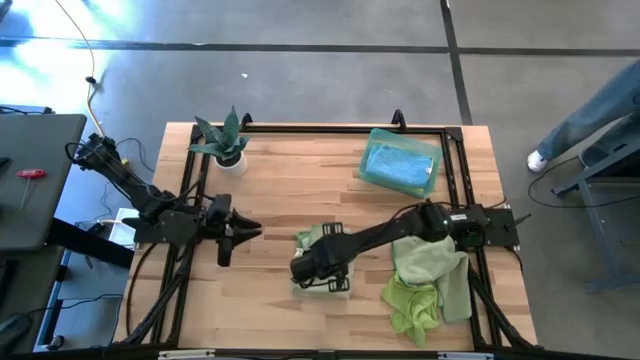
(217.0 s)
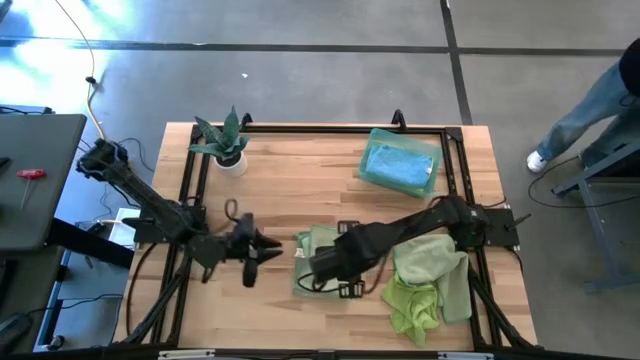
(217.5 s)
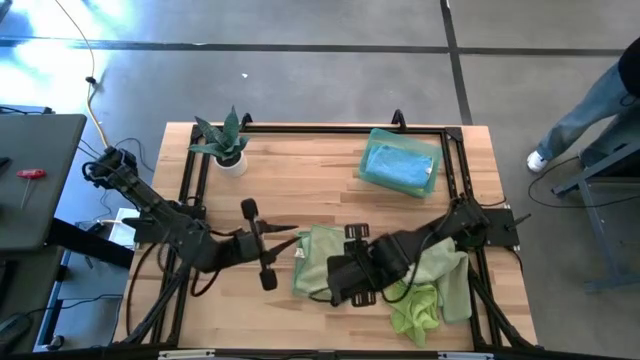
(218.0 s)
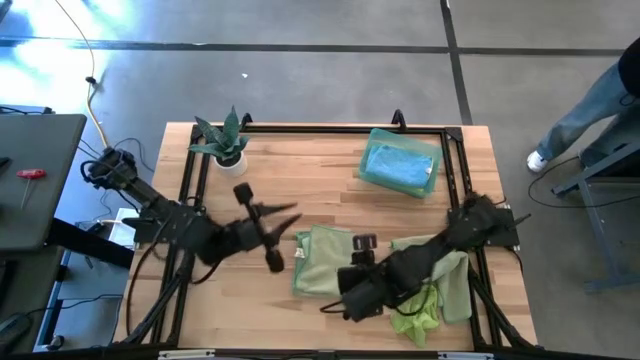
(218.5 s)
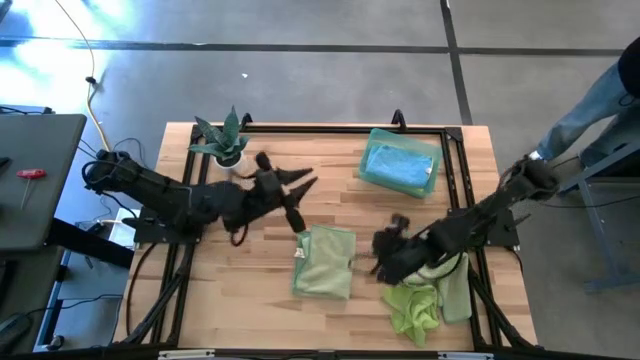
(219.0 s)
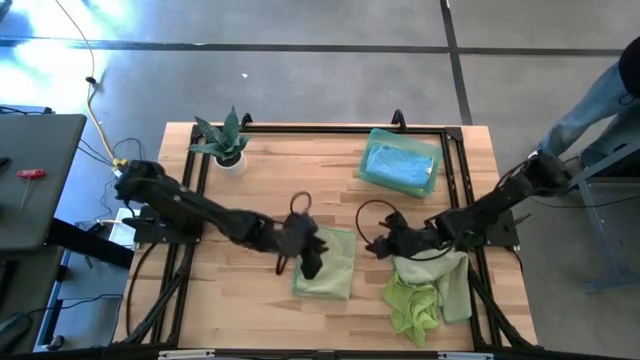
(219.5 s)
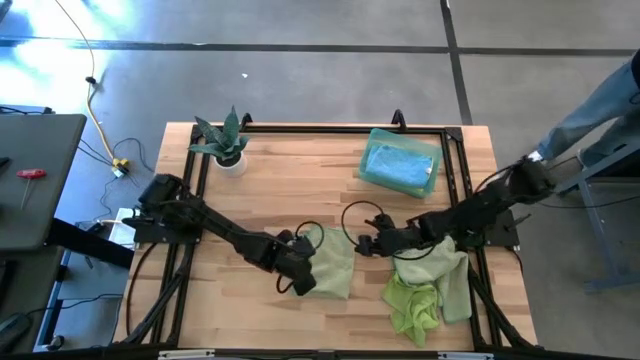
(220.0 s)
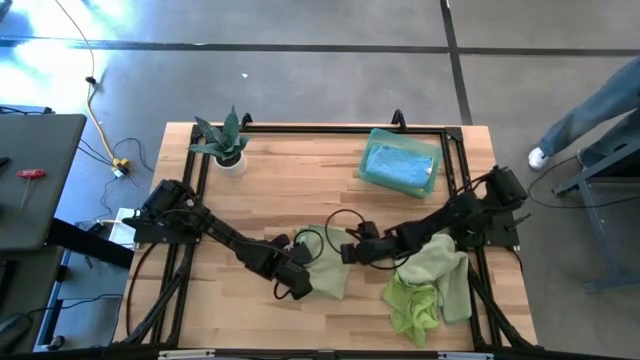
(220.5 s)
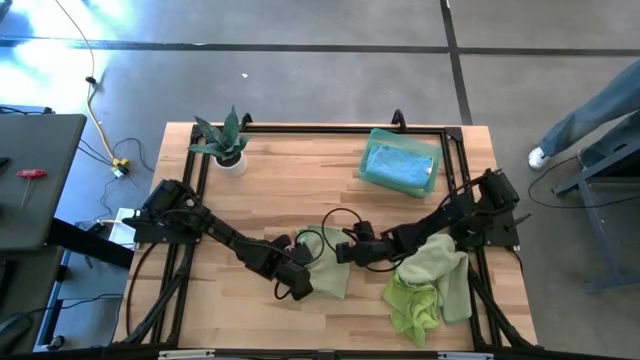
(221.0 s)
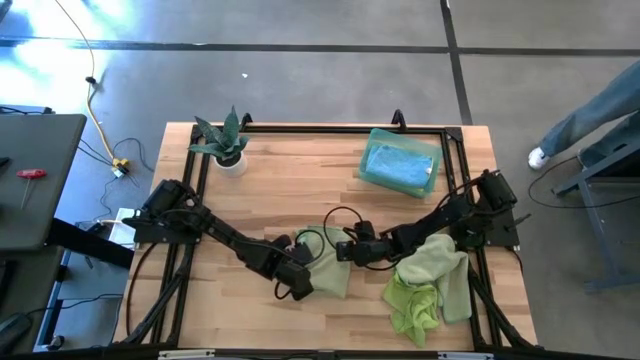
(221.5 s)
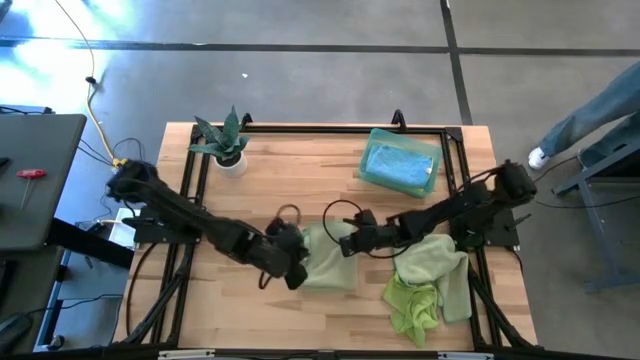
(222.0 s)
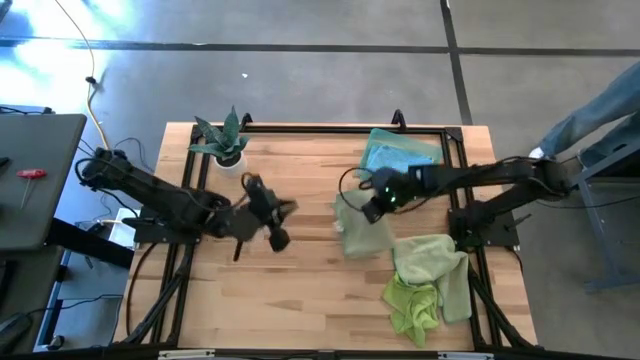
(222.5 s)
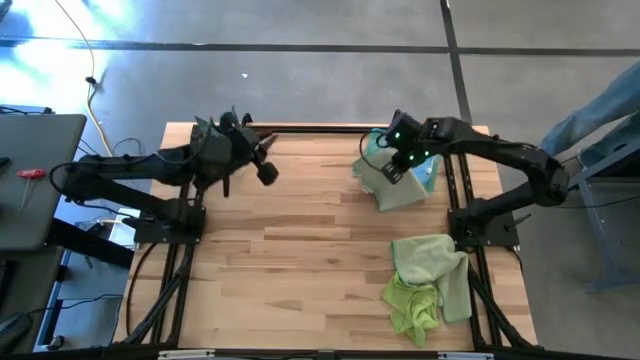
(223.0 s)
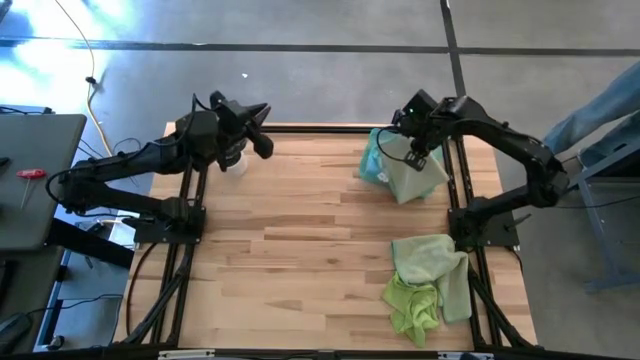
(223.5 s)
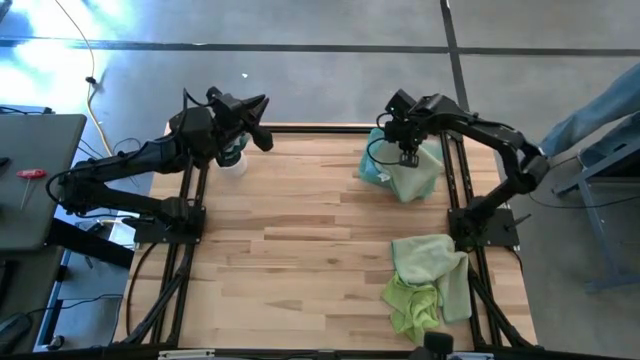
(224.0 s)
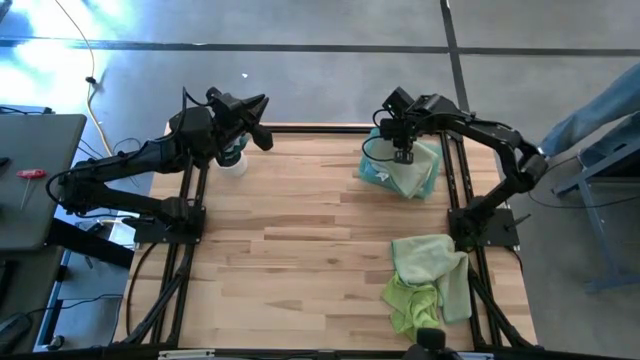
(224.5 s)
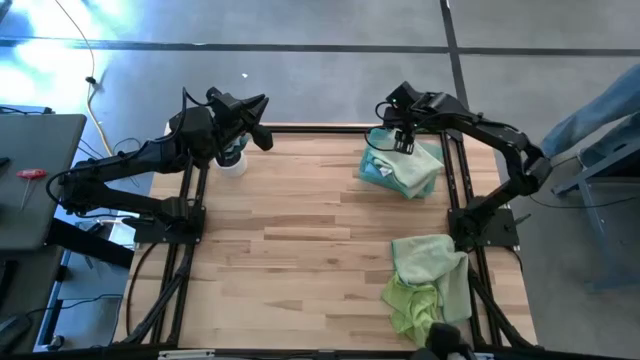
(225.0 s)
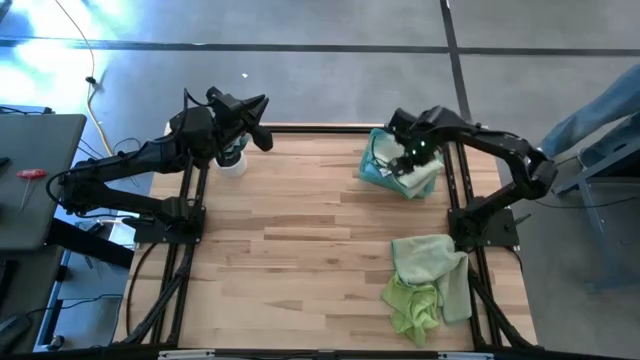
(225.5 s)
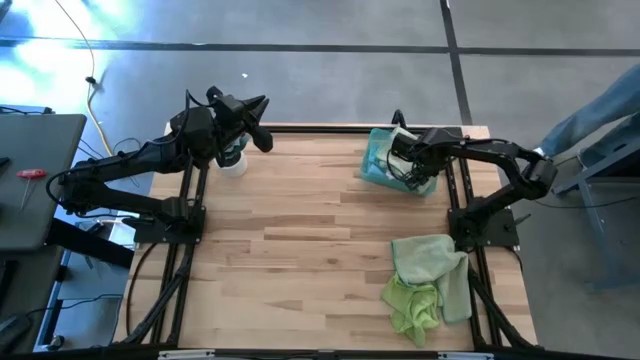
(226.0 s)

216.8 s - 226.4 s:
Task: Fold microfiber towels
Stack the folded left green microfiber cloth on top of the folded blue microfiber cloth

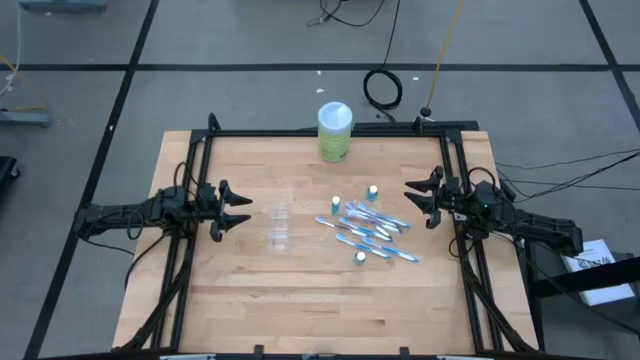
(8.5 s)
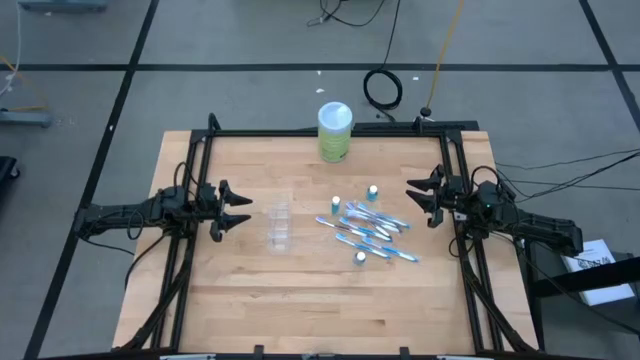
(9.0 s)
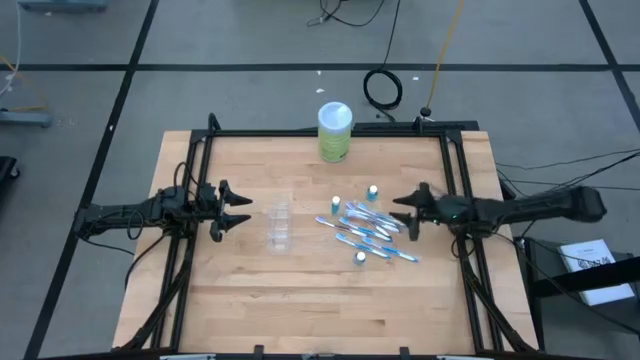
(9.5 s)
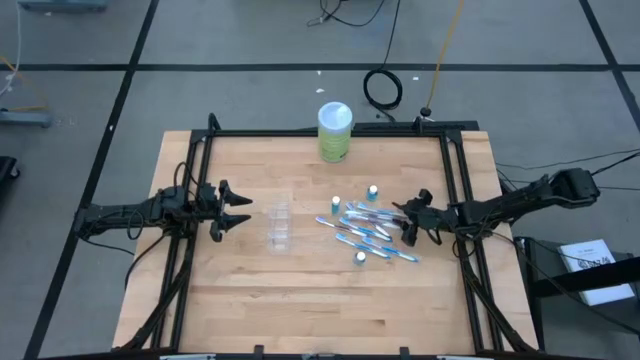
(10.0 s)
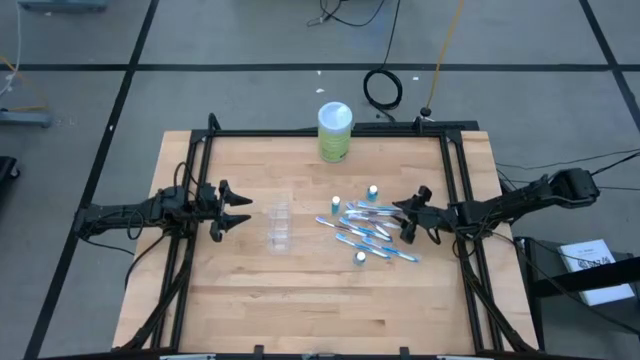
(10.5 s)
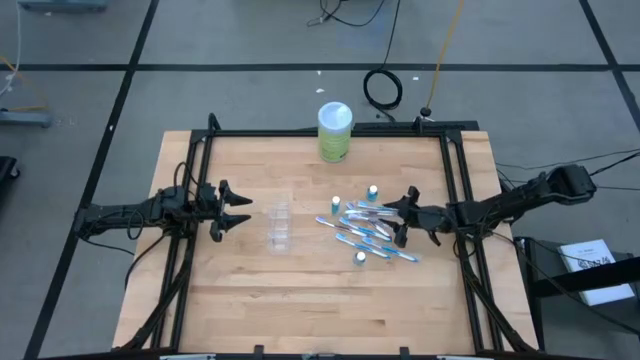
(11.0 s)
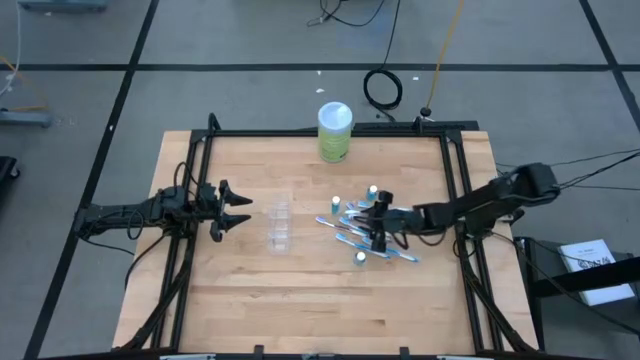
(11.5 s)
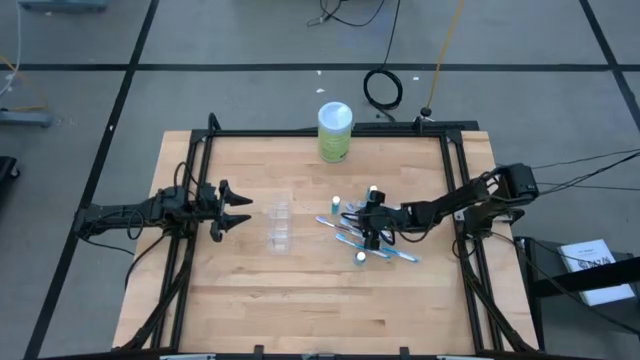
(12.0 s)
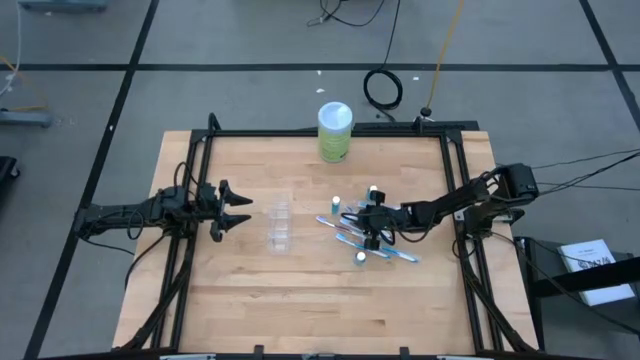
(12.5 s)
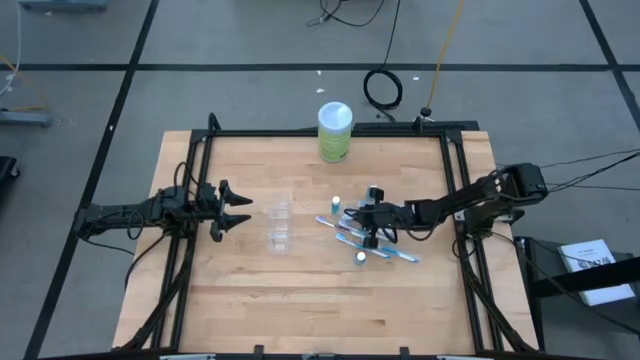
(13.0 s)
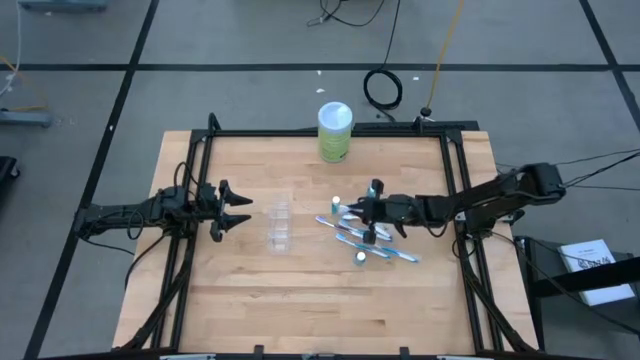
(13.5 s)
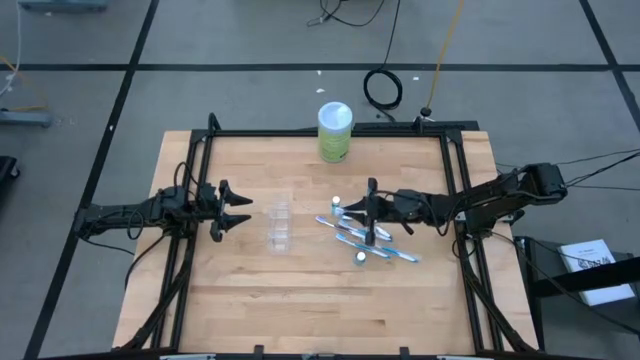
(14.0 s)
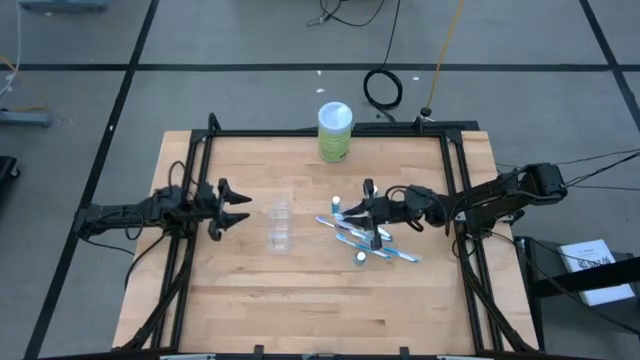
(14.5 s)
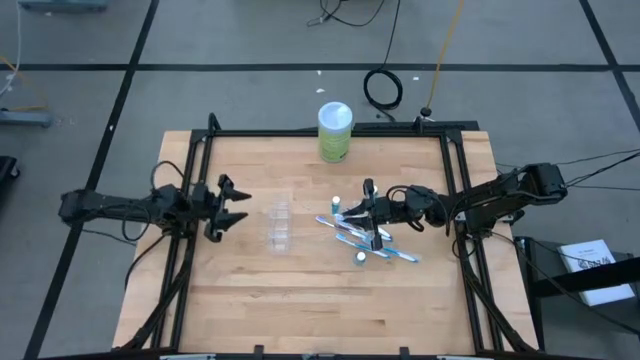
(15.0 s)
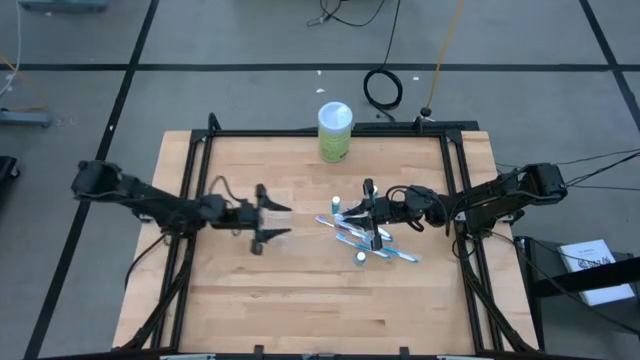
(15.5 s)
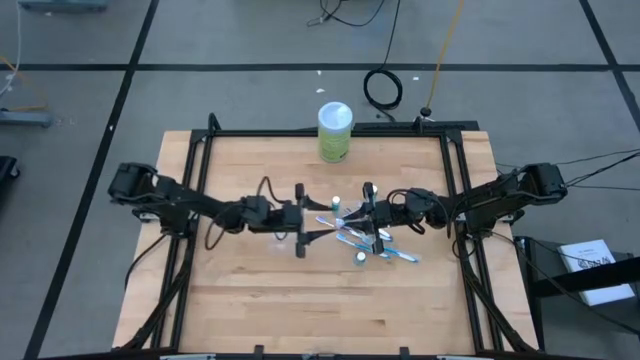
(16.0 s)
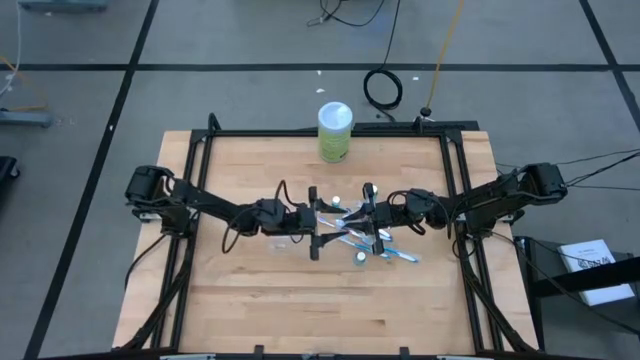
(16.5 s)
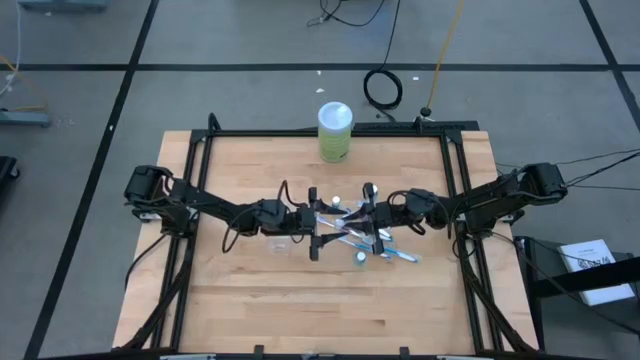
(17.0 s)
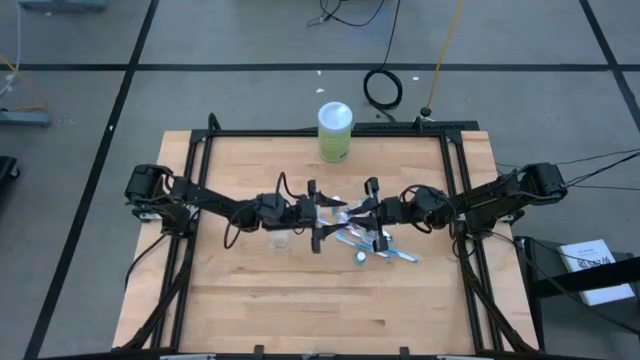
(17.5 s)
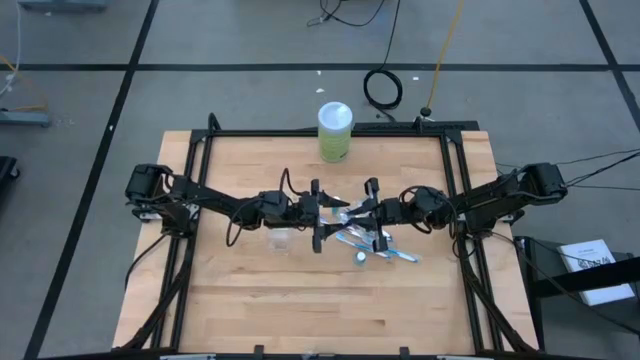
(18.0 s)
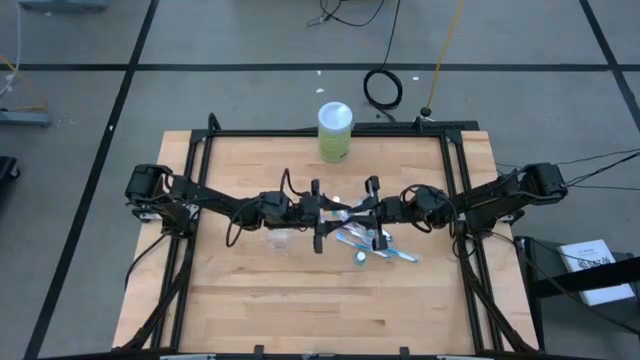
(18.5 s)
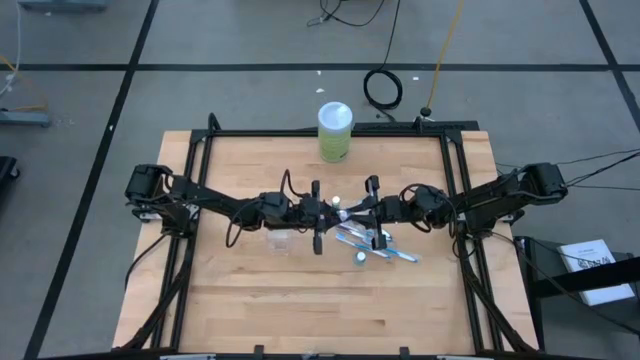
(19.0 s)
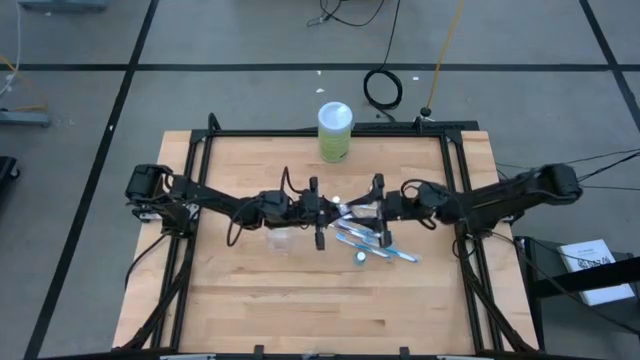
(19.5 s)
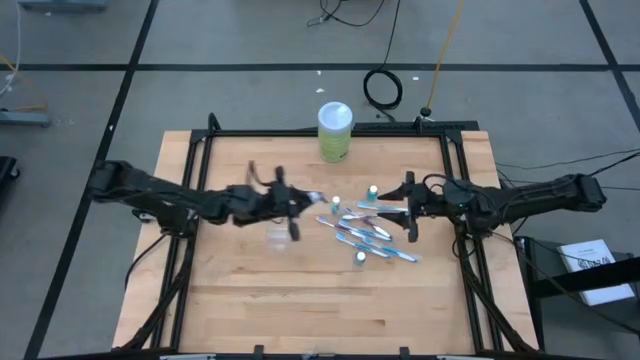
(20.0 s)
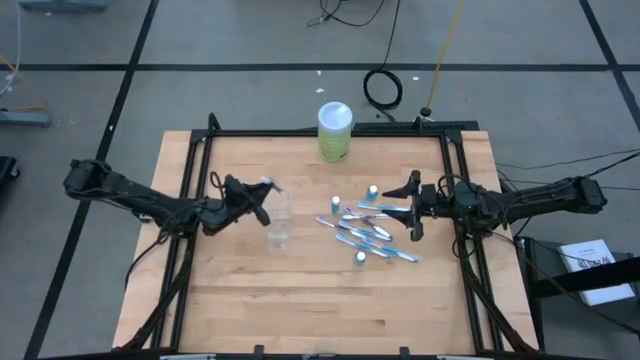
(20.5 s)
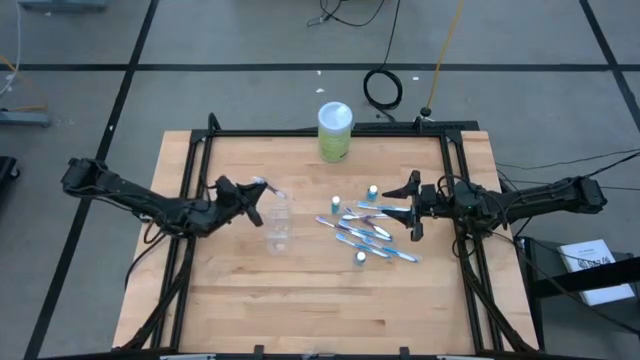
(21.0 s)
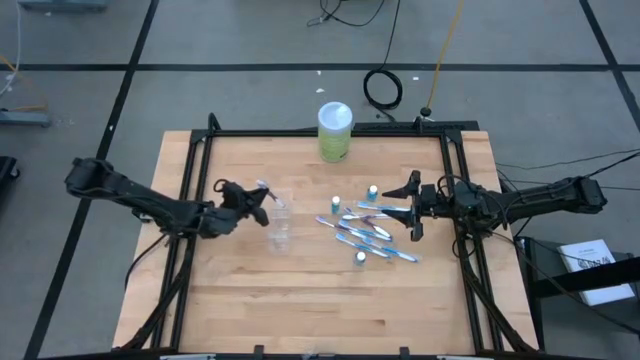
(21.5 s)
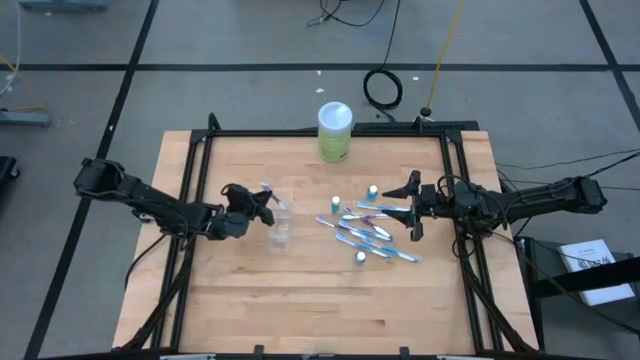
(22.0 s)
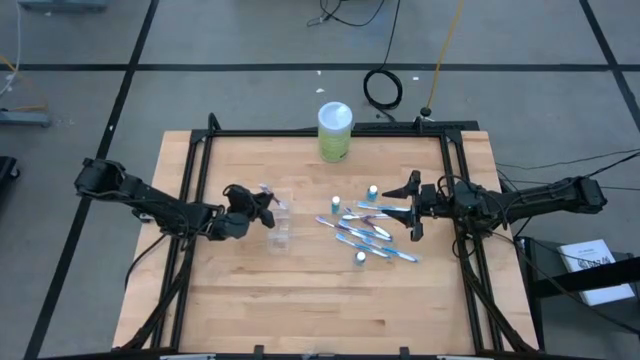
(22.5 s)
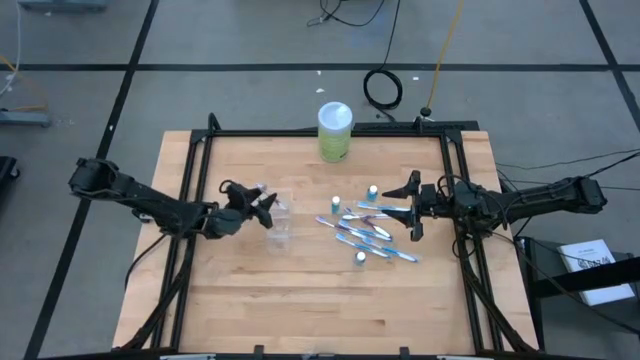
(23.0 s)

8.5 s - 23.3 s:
Task: Pick & Place toothbrushing station
Put the purple toothbrush into the transparent organizer
